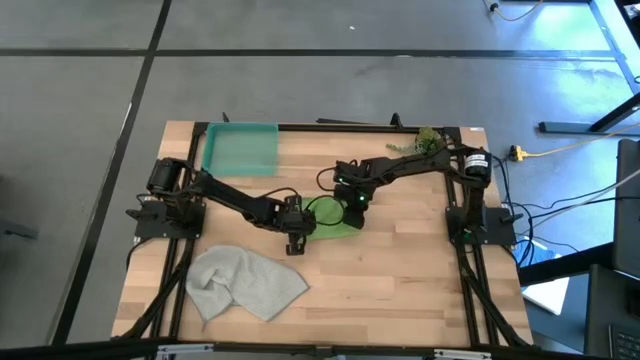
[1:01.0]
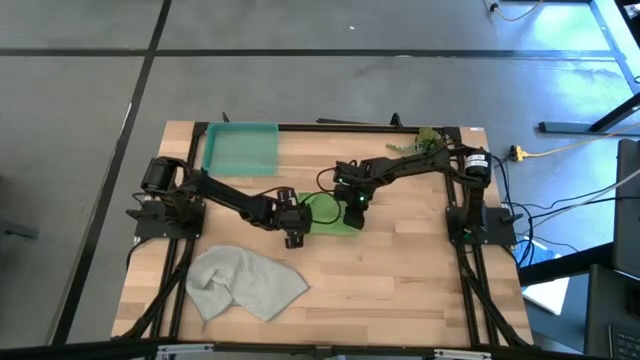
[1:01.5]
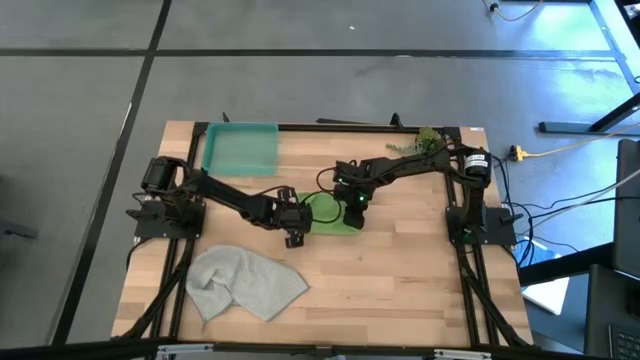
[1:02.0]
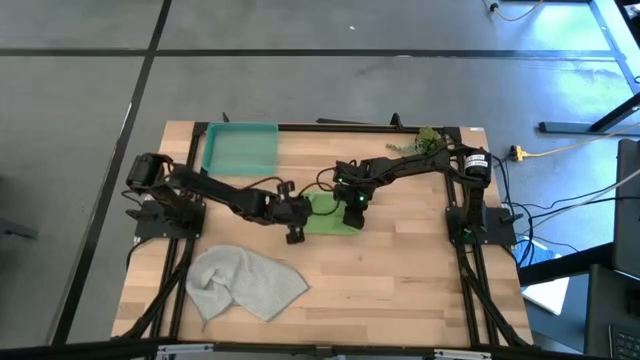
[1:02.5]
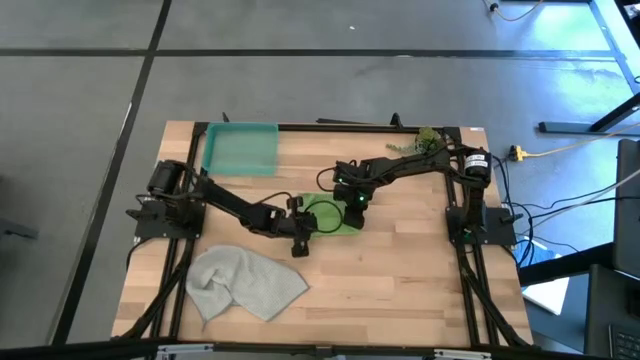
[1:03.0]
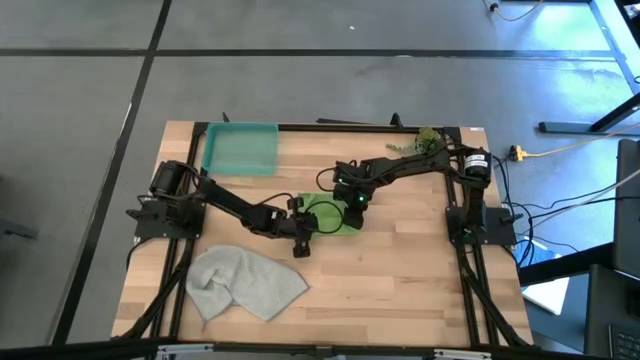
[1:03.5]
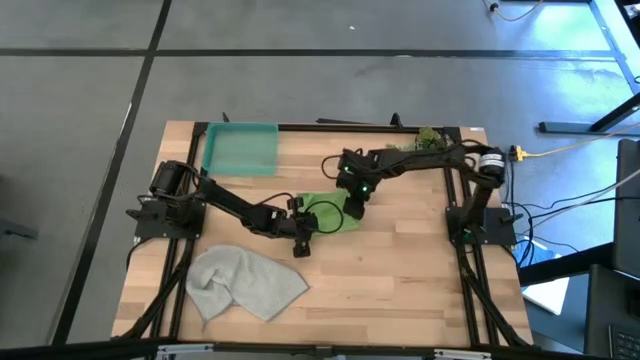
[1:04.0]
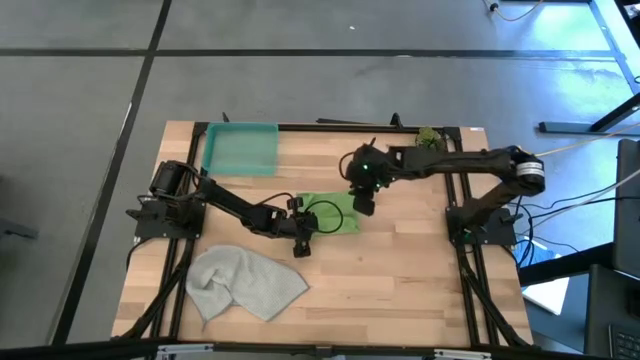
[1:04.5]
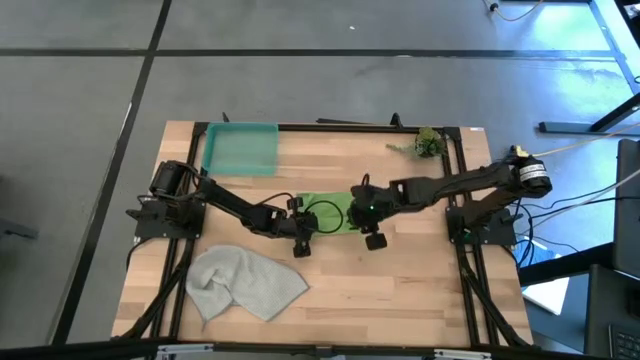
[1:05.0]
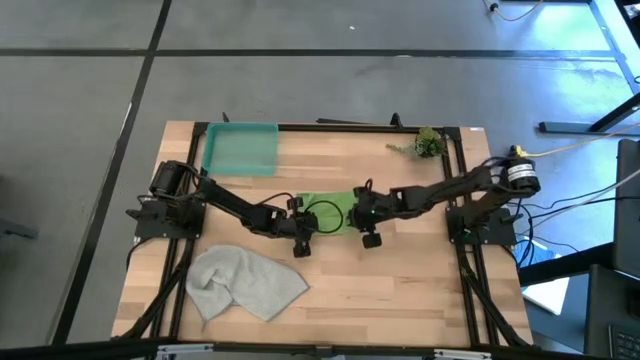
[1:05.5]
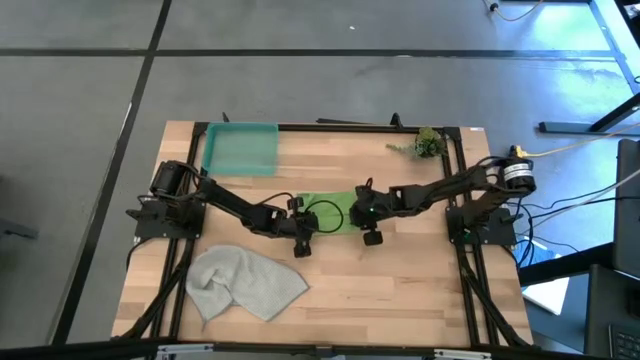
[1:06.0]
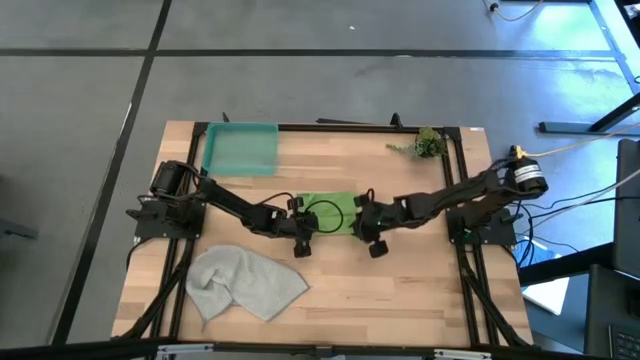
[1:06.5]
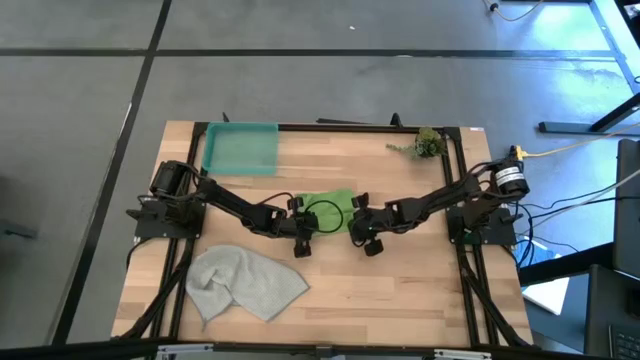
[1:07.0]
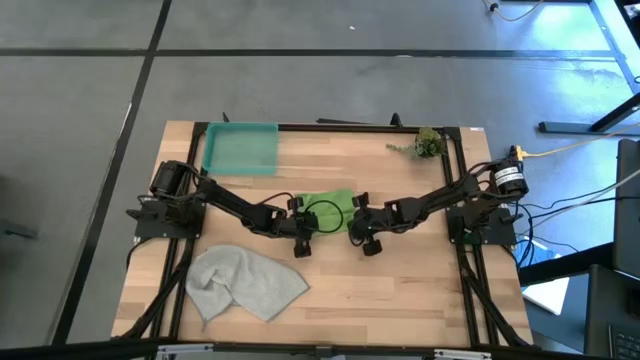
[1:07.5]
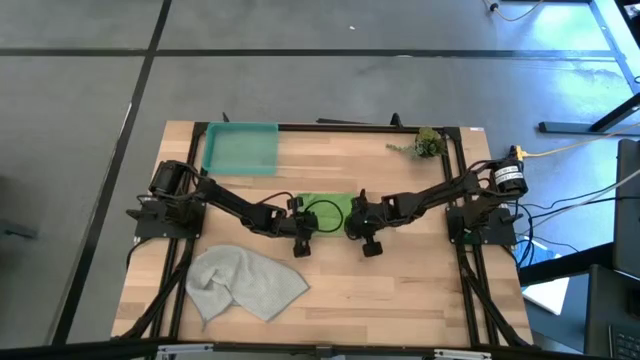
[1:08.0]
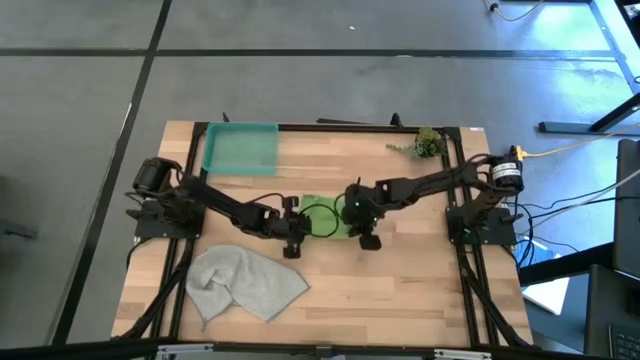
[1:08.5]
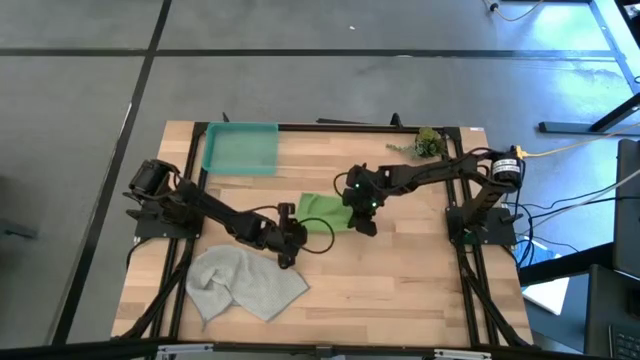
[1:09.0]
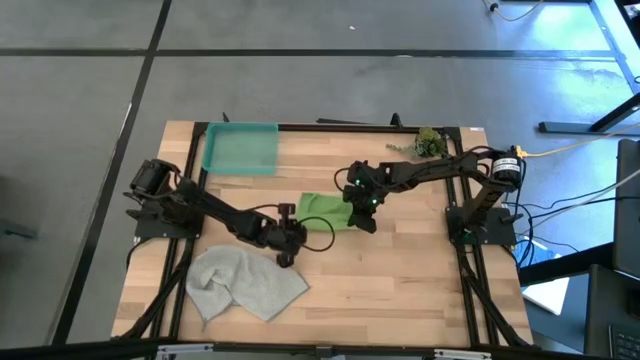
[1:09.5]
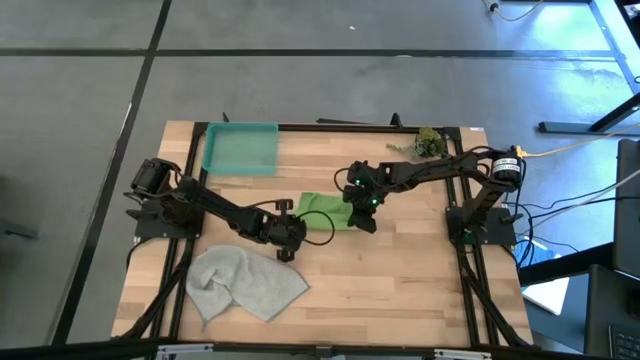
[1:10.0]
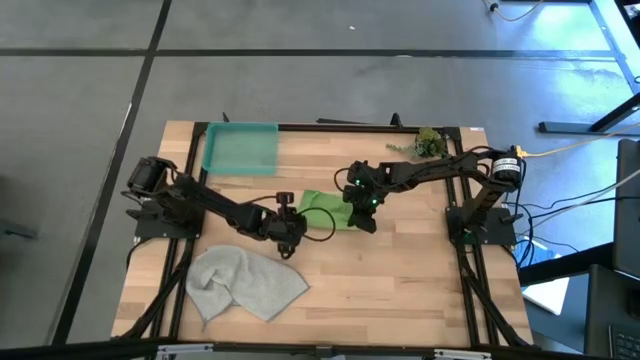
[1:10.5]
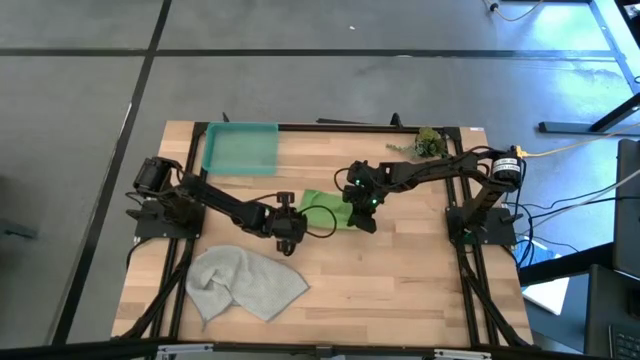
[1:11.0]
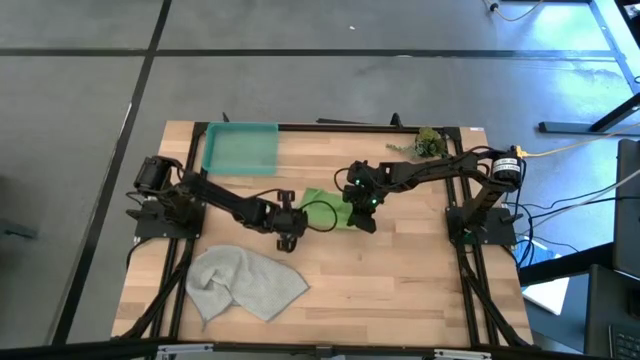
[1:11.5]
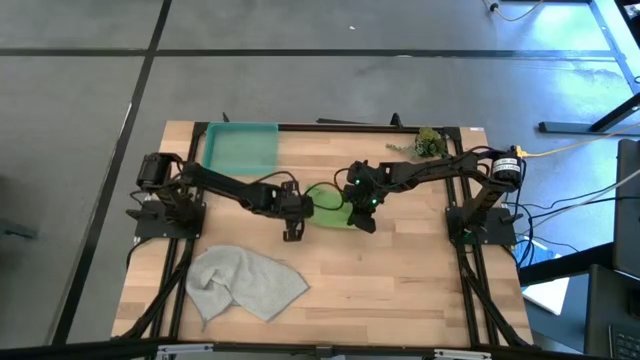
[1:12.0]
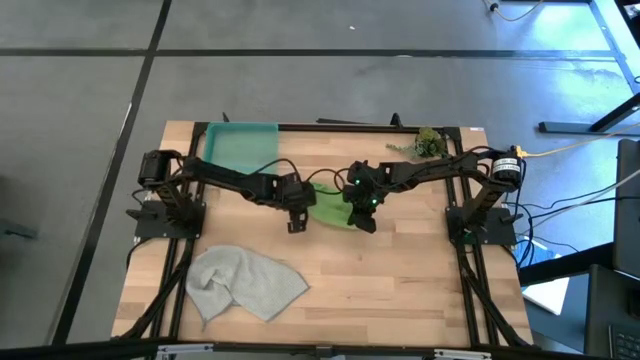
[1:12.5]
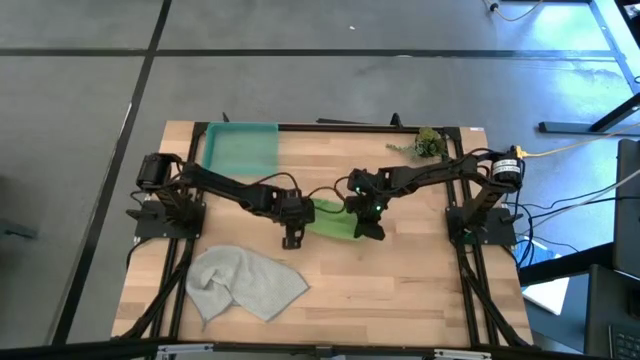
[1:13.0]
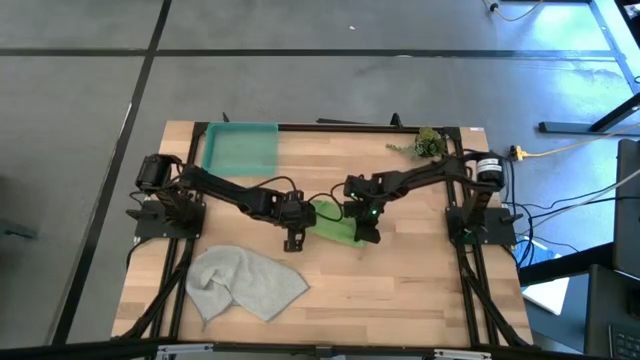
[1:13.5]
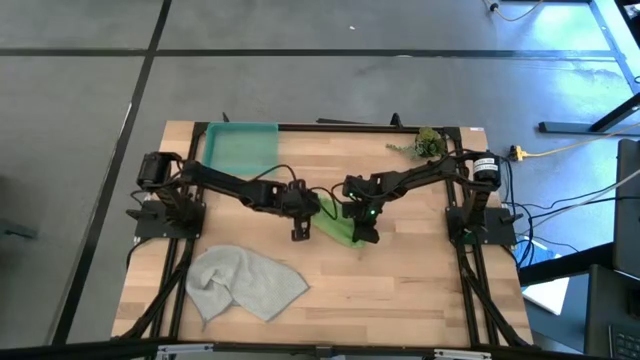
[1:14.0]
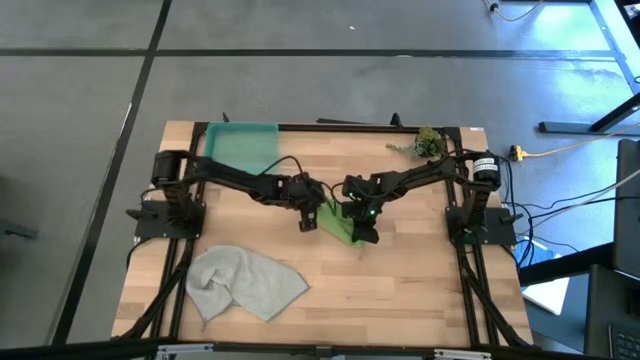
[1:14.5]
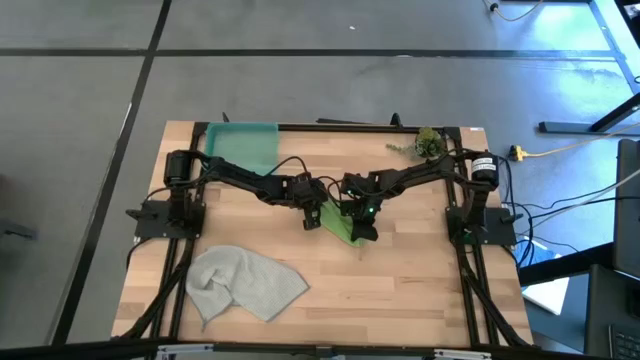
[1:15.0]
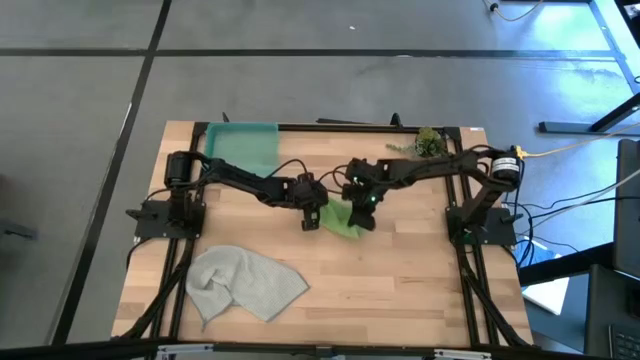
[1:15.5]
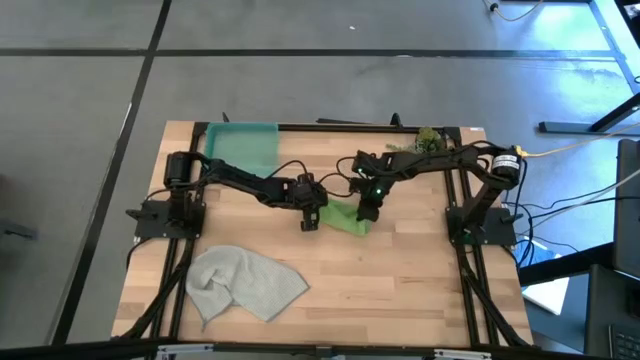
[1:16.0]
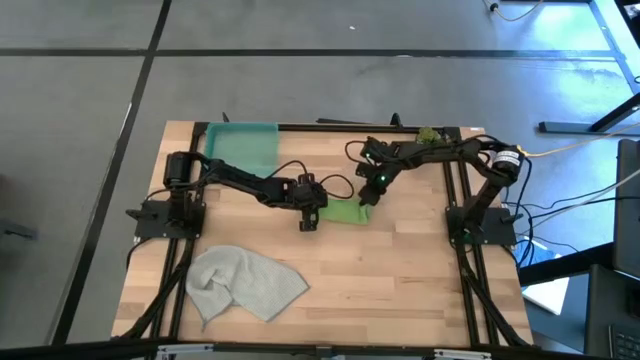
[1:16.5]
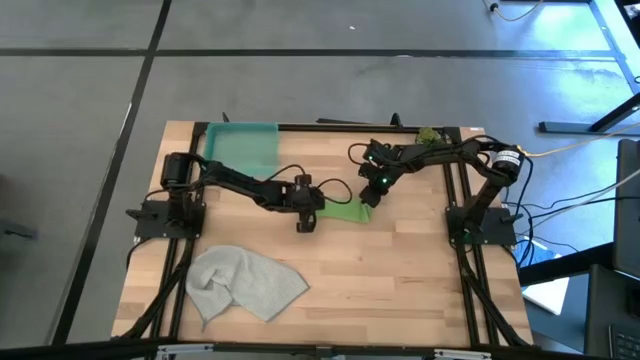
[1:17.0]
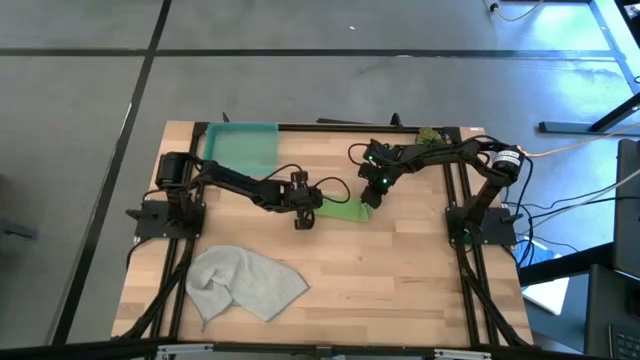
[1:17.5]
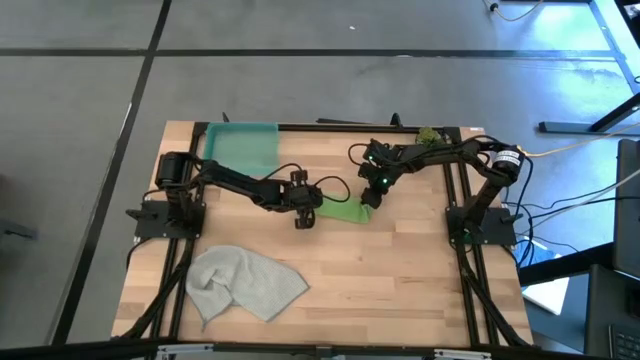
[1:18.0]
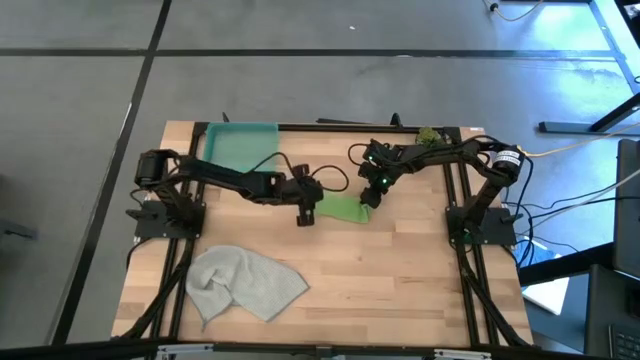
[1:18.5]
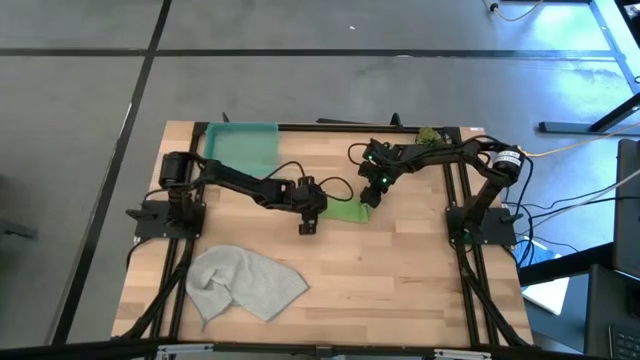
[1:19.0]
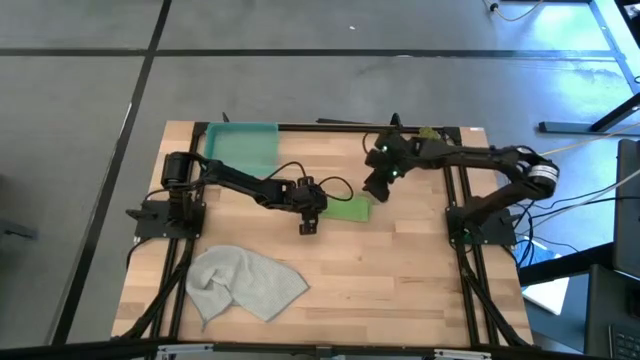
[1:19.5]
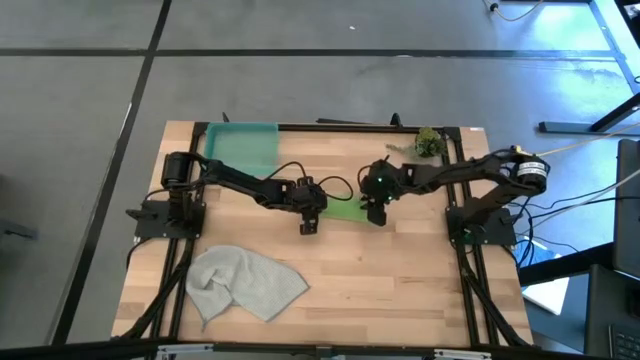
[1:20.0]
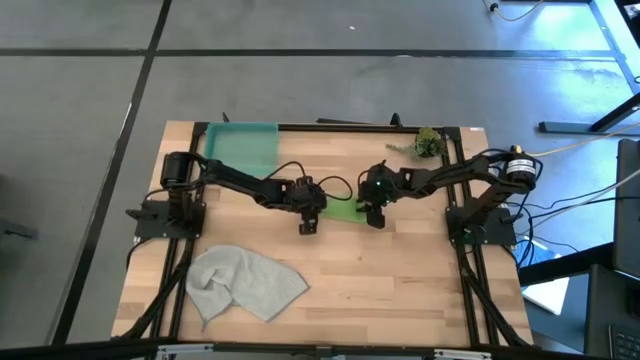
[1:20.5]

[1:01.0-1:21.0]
Task: Roll microfiber towels into tight, uniform cylinder then place into a basket
Roll the green towel
